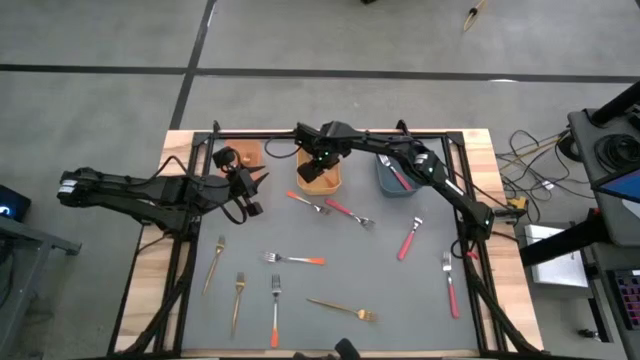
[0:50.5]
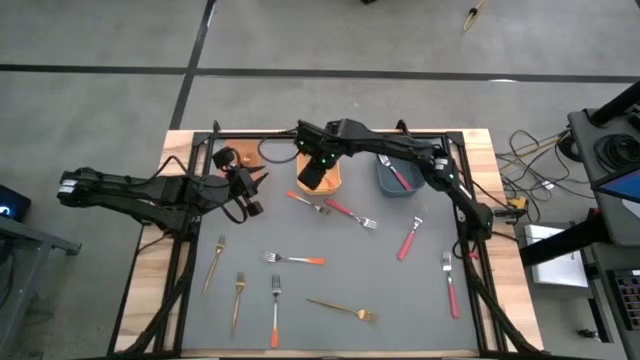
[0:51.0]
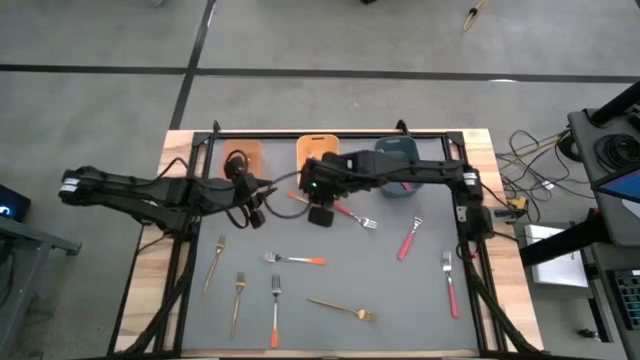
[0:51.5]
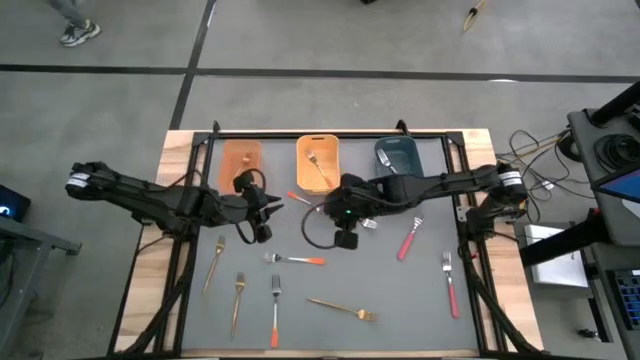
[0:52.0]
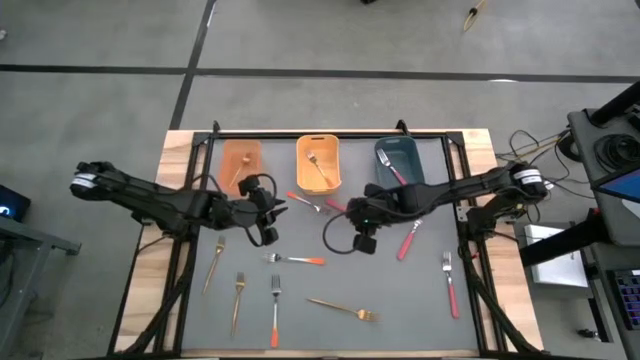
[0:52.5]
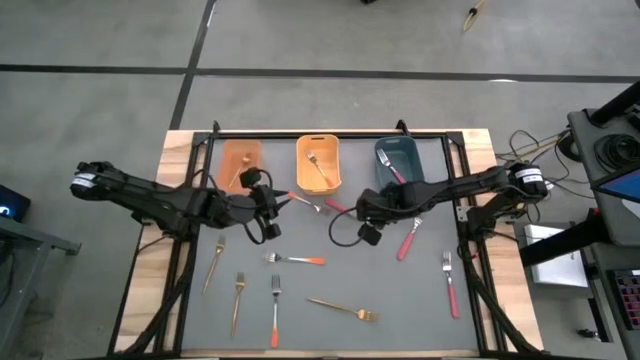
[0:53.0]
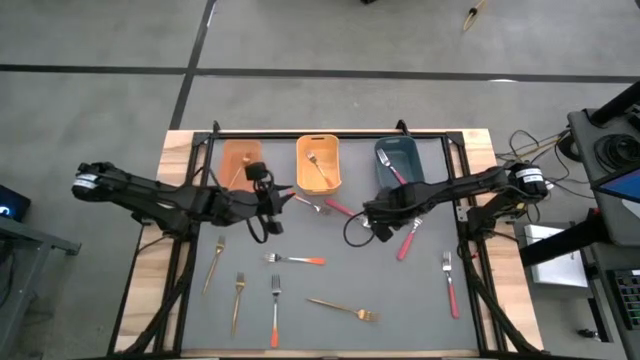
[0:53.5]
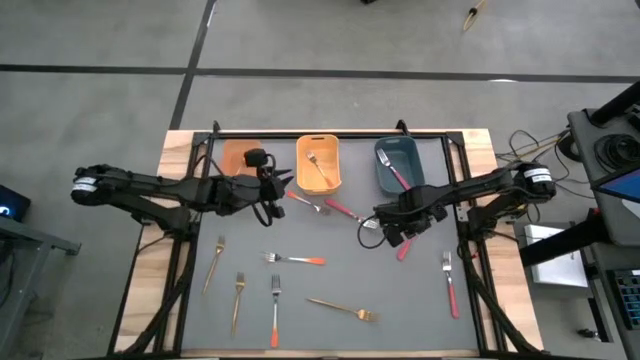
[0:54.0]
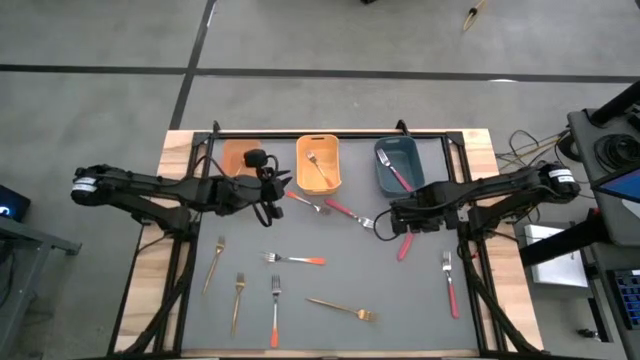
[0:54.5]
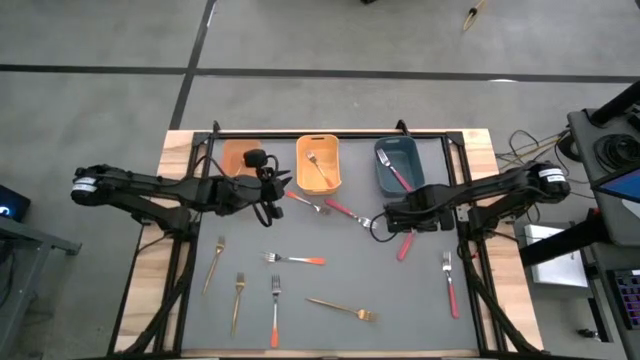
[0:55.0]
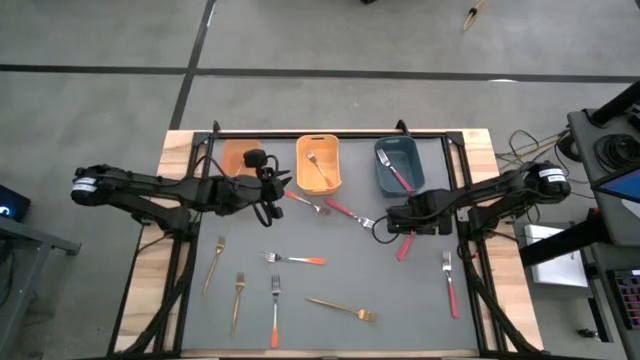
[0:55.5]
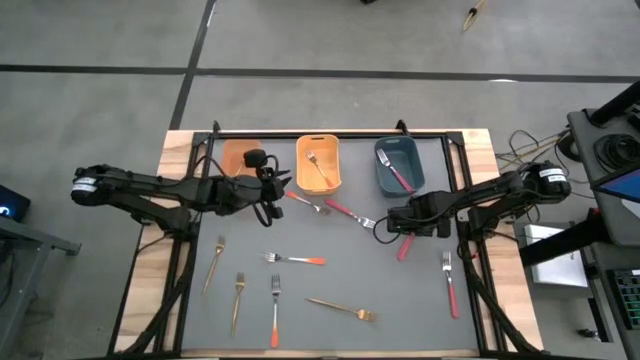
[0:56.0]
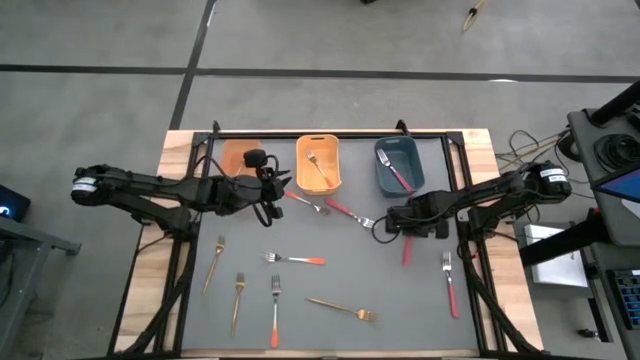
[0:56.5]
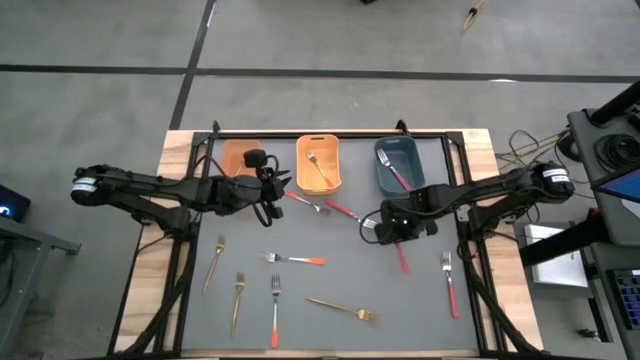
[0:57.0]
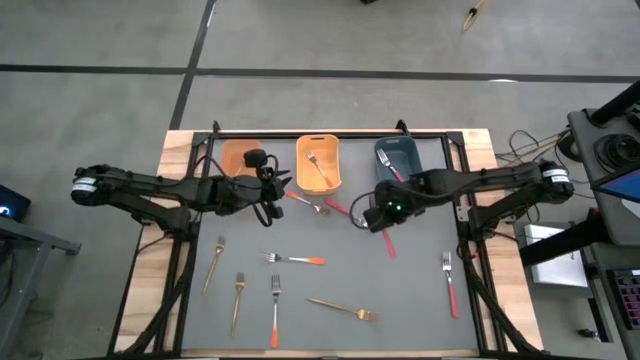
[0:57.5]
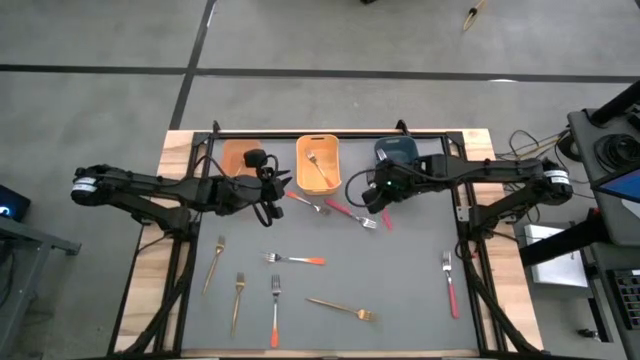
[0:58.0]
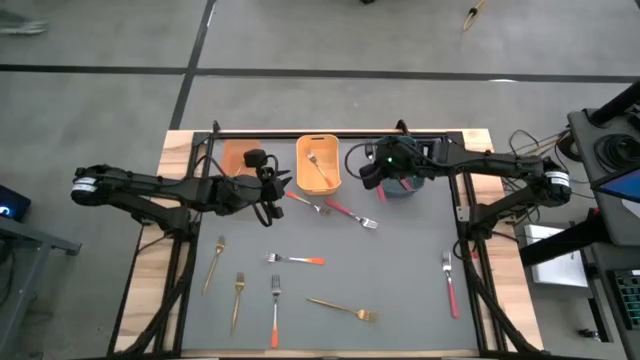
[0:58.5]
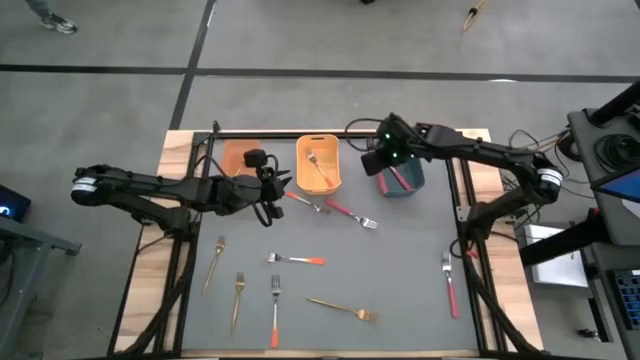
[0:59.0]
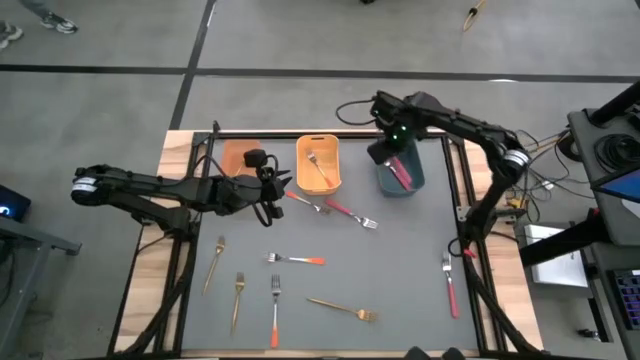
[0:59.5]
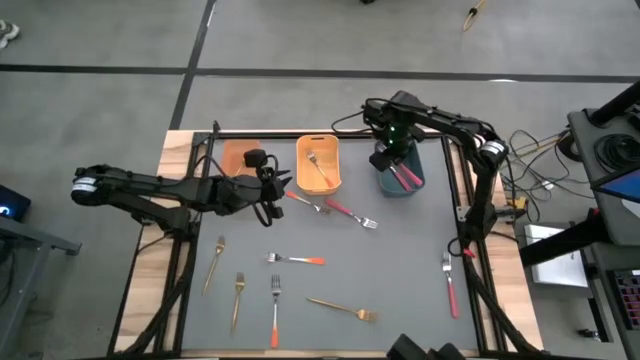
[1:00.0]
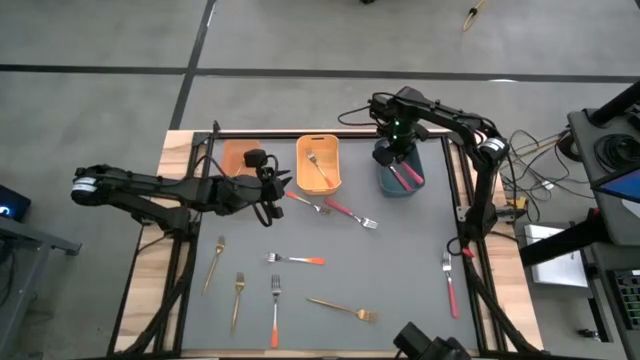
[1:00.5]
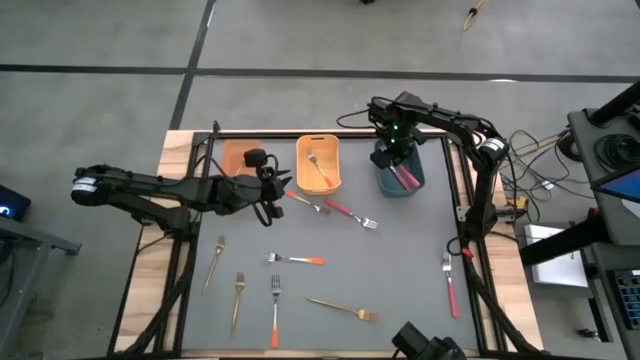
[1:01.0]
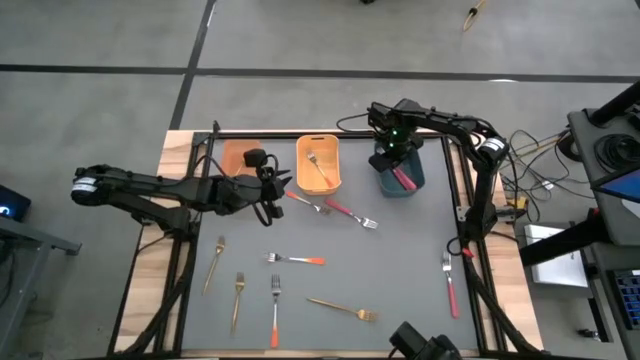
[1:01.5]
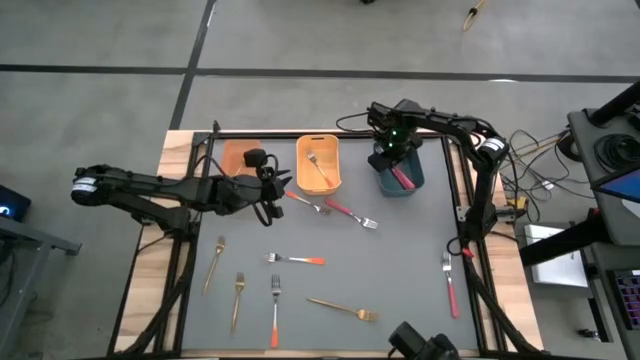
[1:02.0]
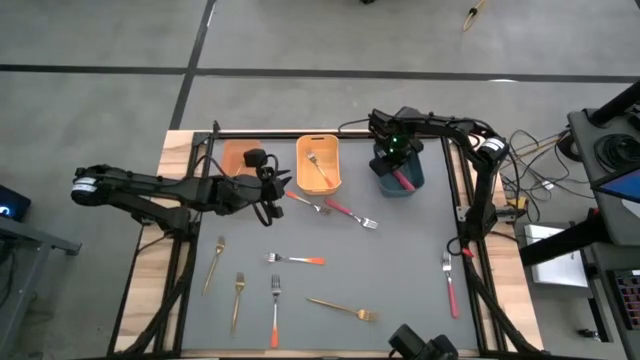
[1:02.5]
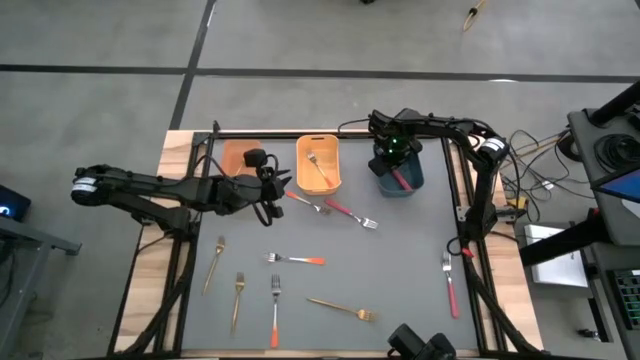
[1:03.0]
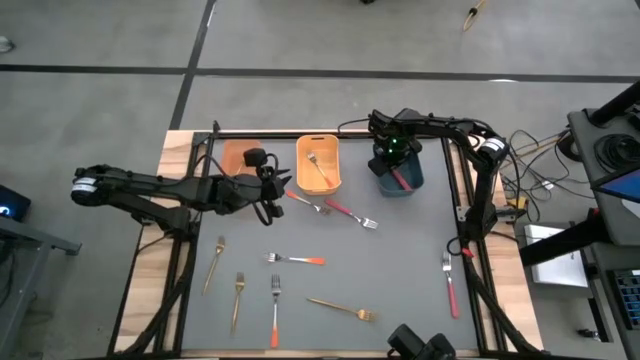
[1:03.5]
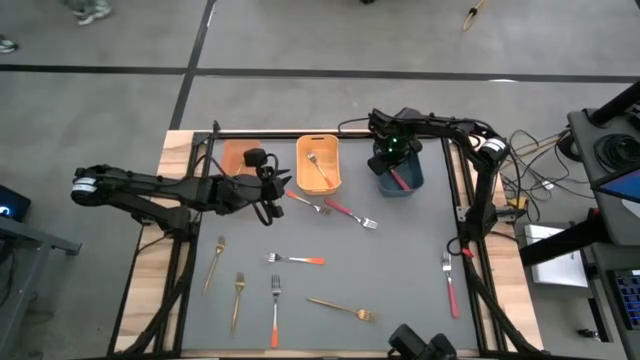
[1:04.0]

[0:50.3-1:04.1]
Task: Sort silverware by color (type)
Put the red fork into the blue bin

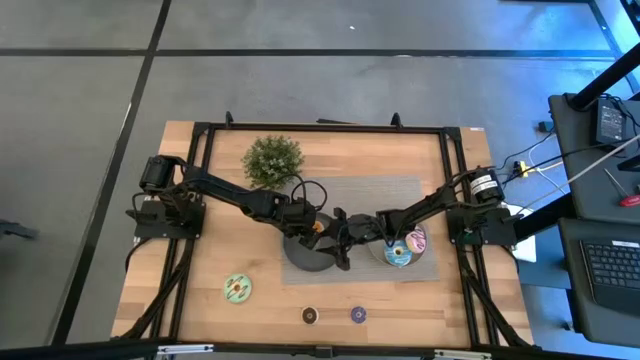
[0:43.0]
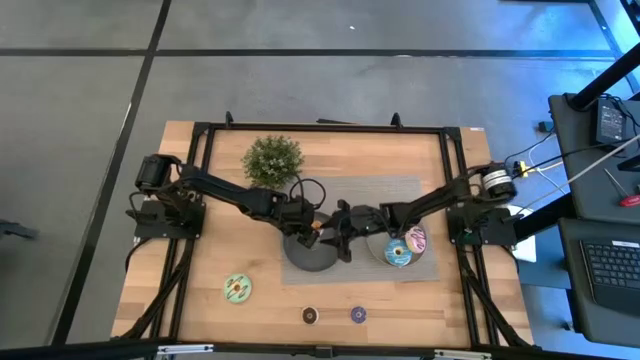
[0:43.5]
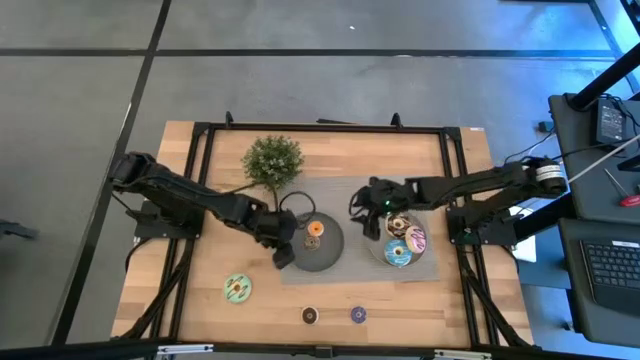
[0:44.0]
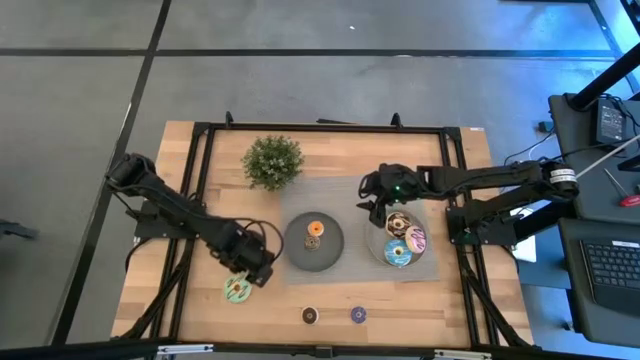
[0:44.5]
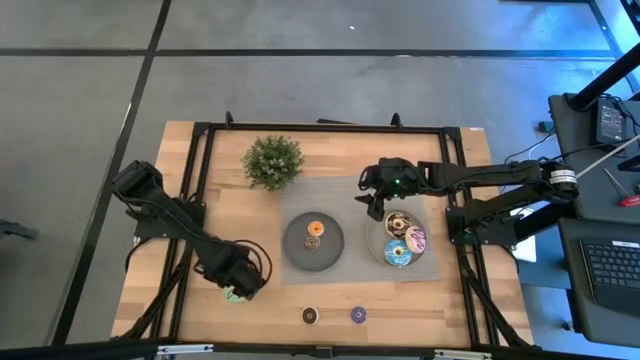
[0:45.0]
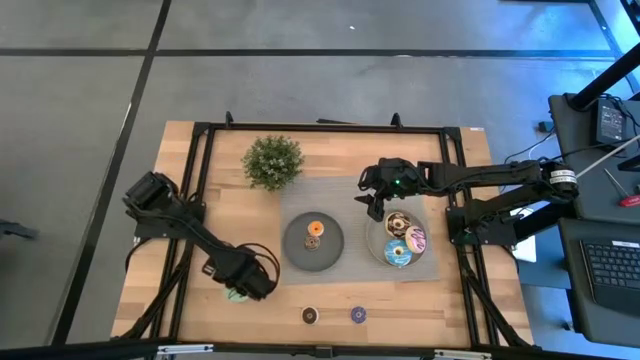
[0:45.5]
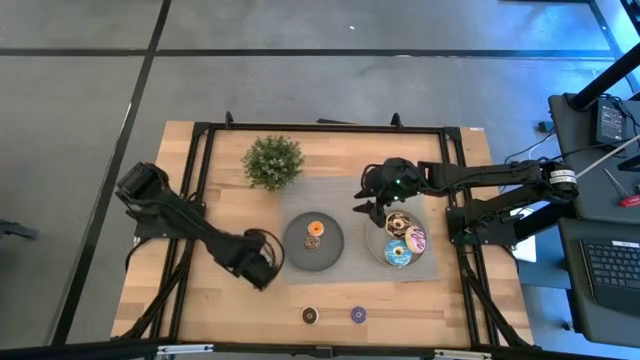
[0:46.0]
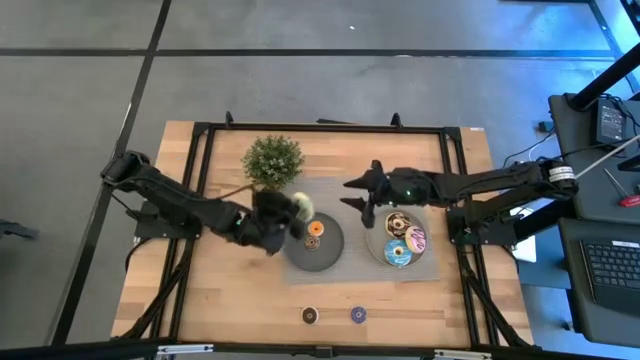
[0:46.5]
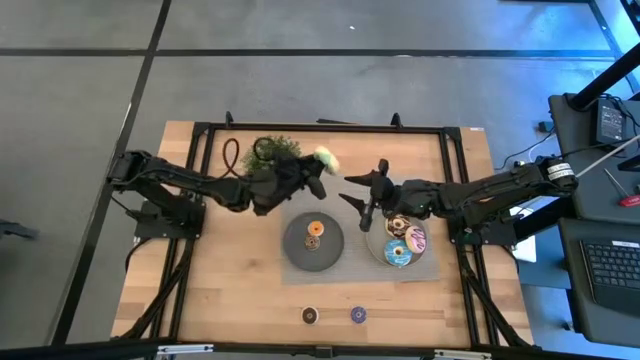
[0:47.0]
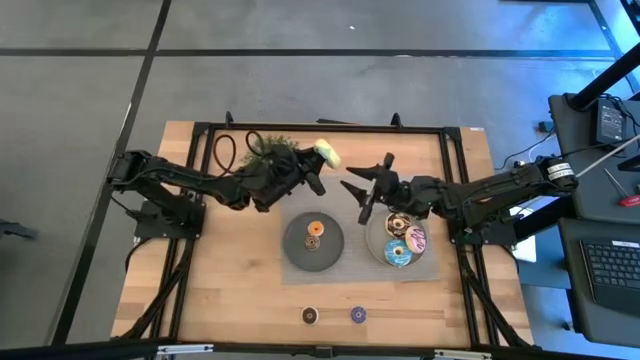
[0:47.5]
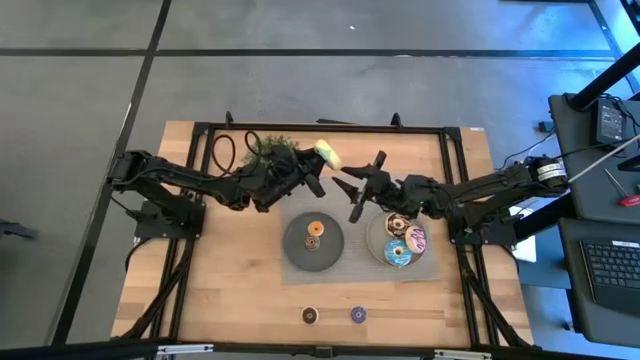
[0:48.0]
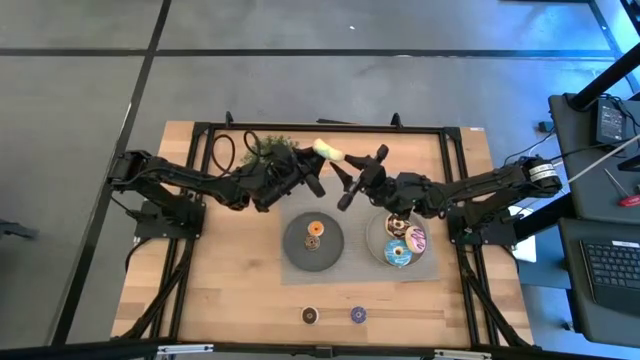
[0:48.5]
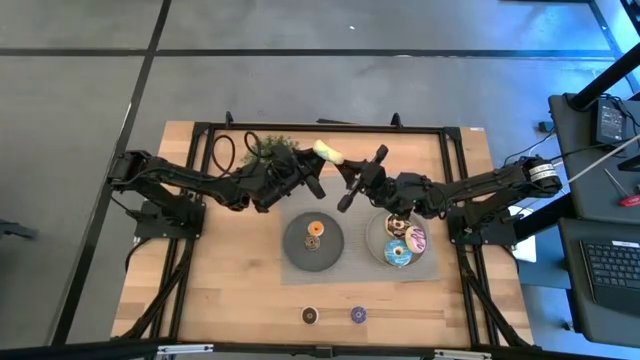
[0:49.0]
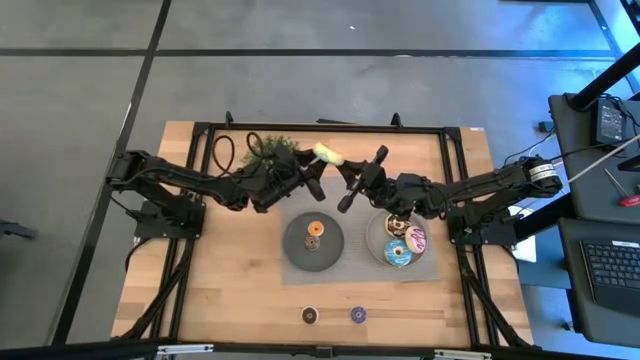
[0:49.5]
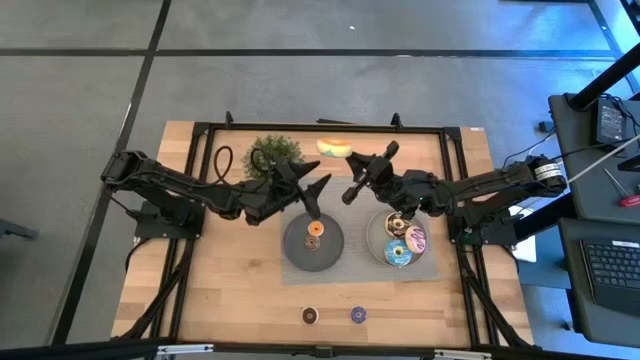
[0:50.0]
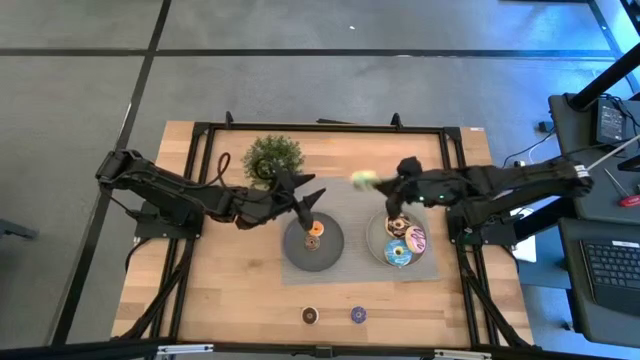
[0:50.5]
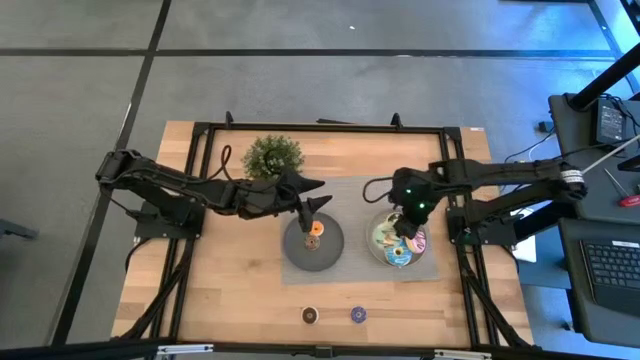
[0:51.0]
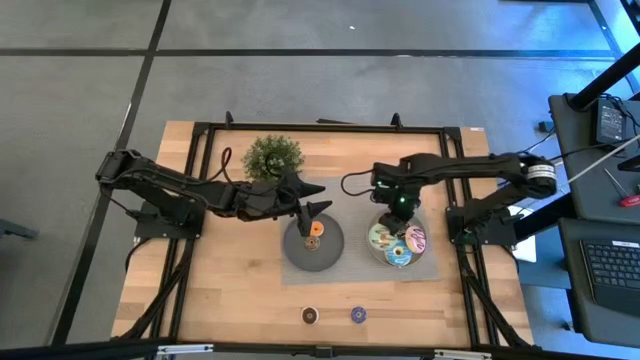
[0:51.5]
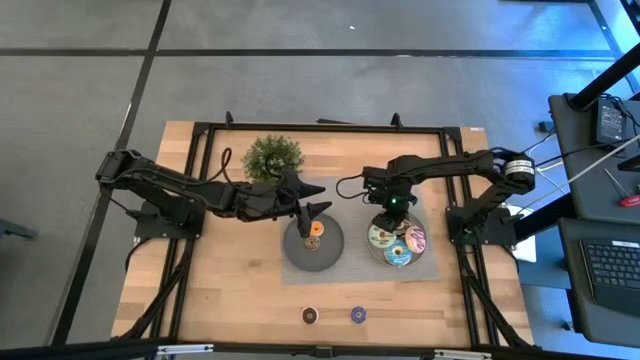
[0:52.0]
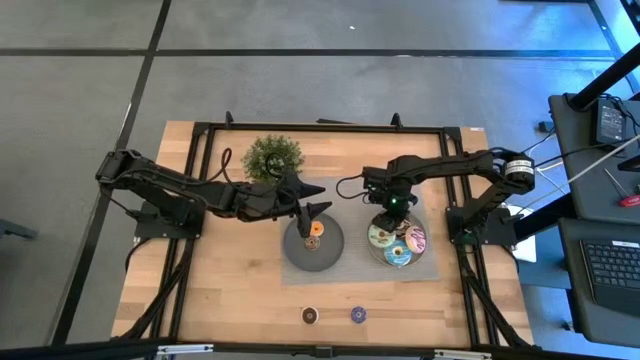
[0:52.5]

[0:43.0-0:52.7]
Task: Pick & Place donuts
Put the large light blue donut on the light gray plate
